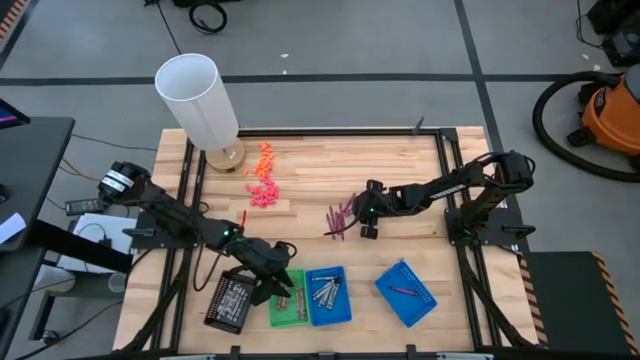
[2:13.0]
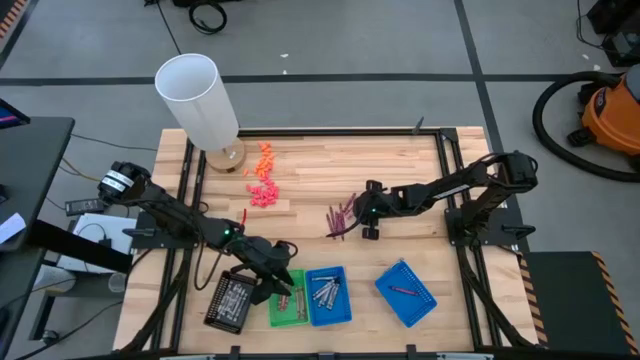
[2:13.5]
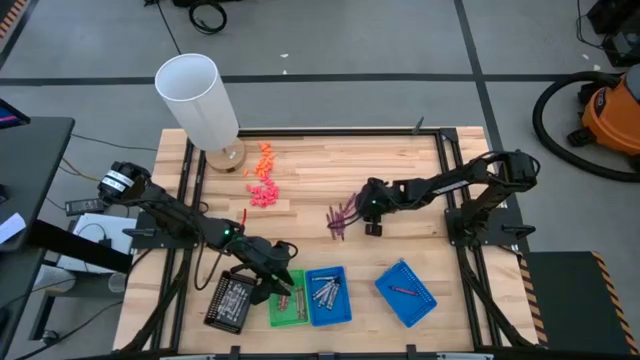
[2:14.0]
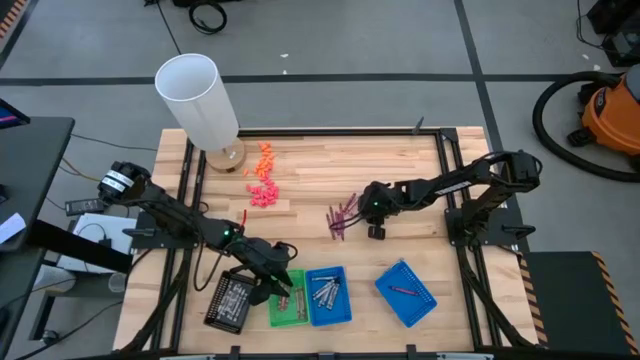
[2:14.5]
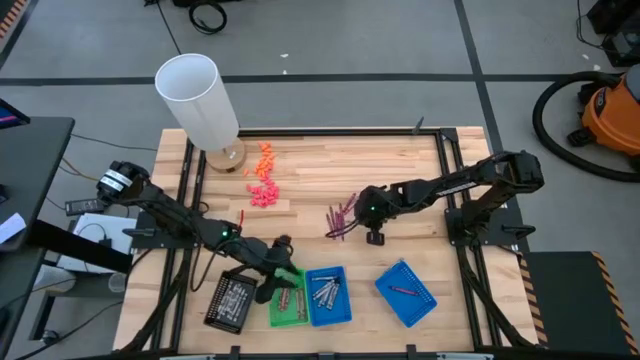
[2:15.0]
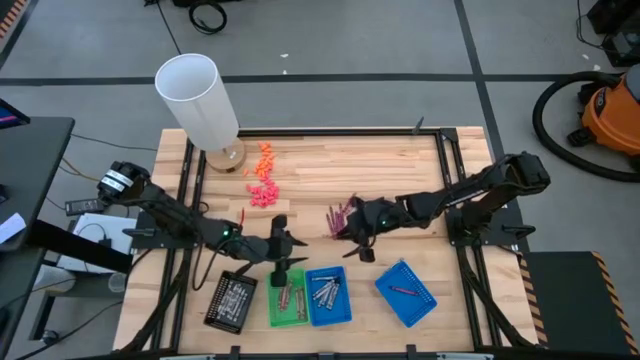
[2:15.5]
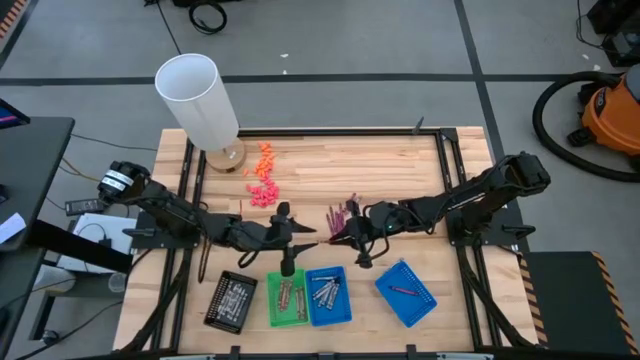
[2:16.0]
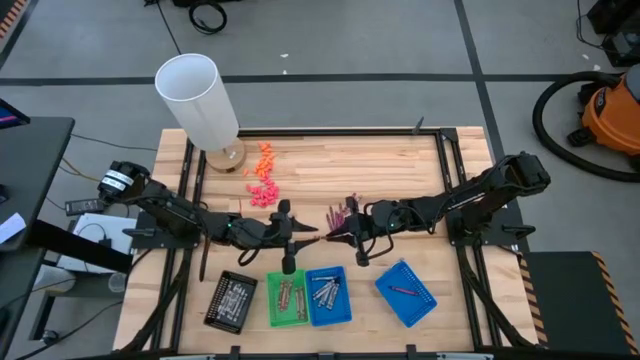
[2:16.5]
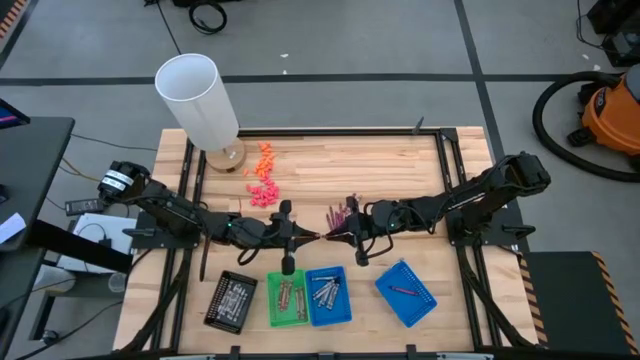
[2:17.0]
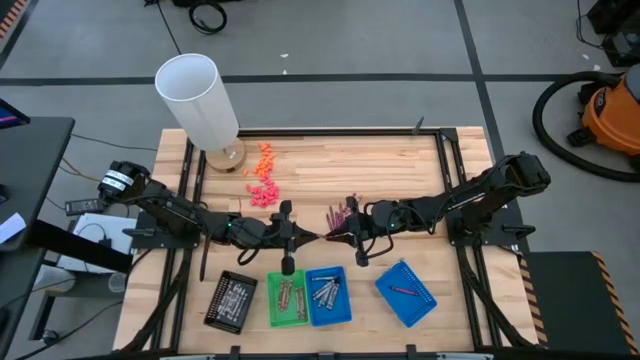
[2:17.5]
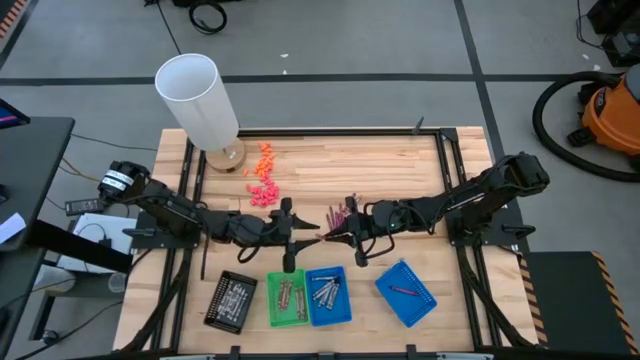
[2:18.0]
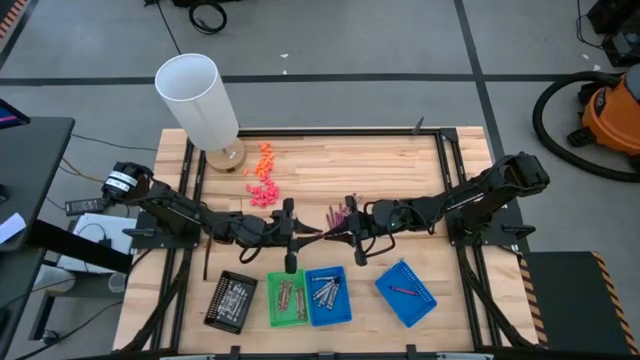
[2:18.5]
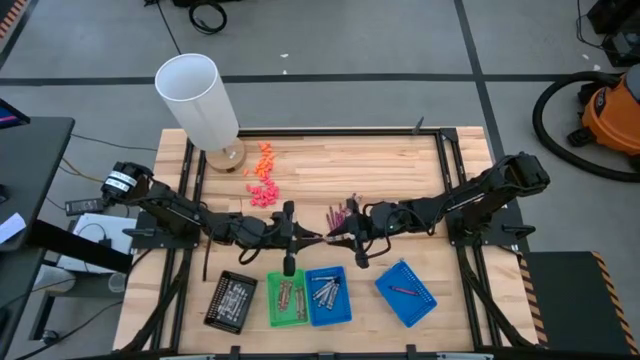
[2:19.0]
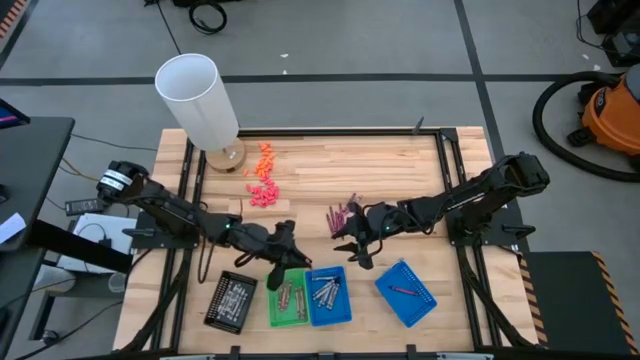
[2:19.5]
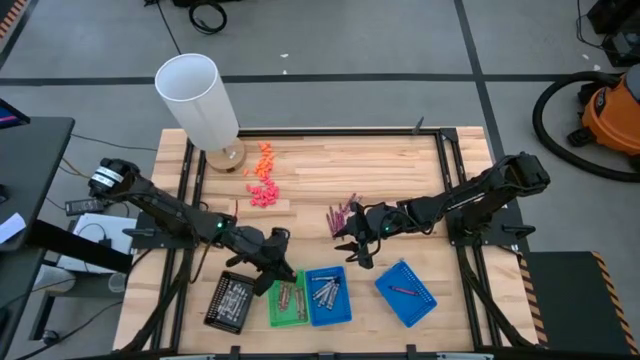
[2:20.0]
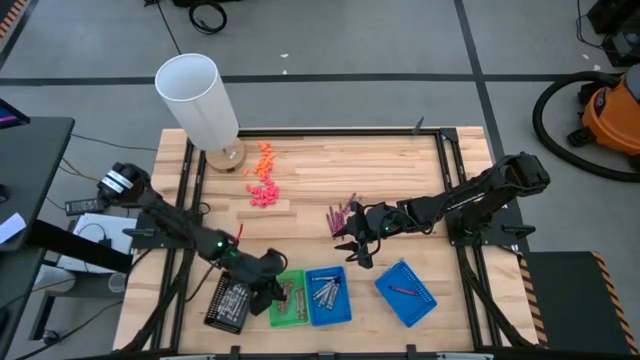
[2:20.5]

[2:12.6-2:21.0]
Task: Sort crayons
Put the pink crayon into the green bin

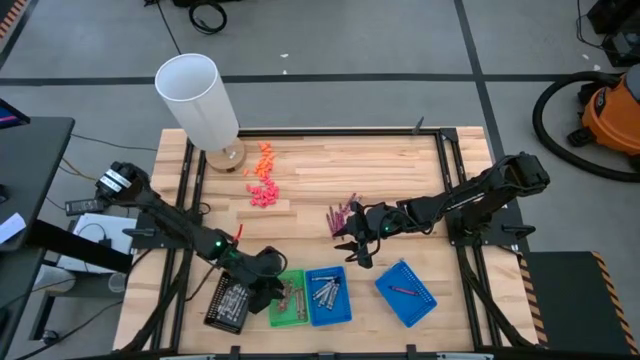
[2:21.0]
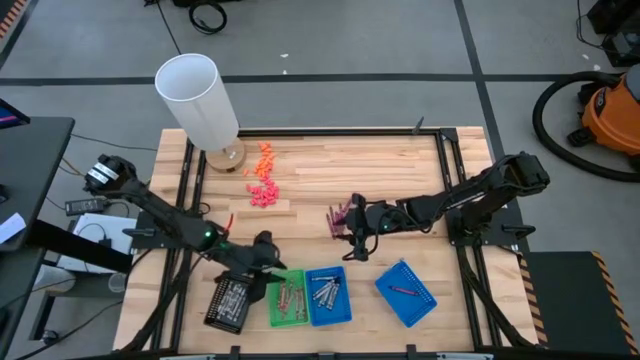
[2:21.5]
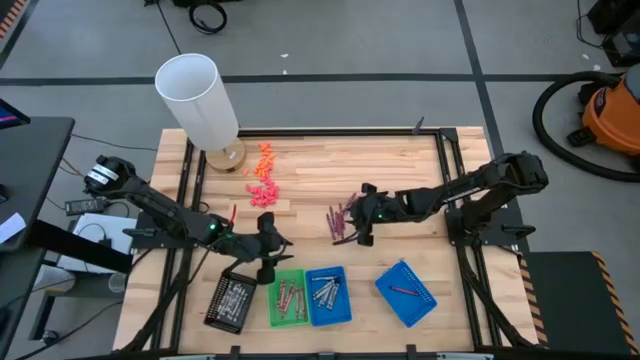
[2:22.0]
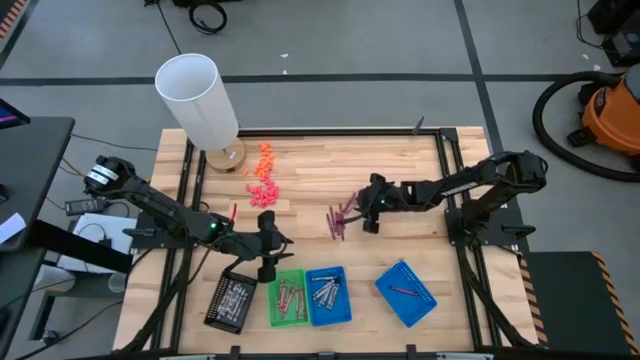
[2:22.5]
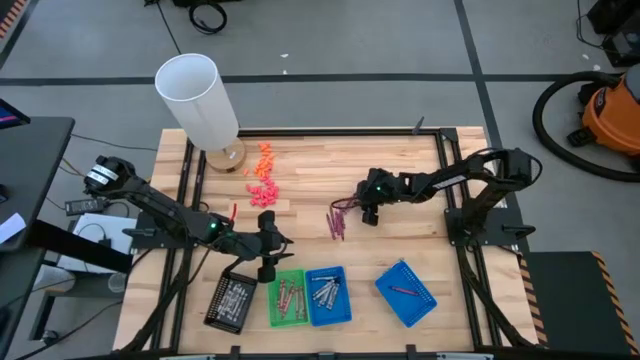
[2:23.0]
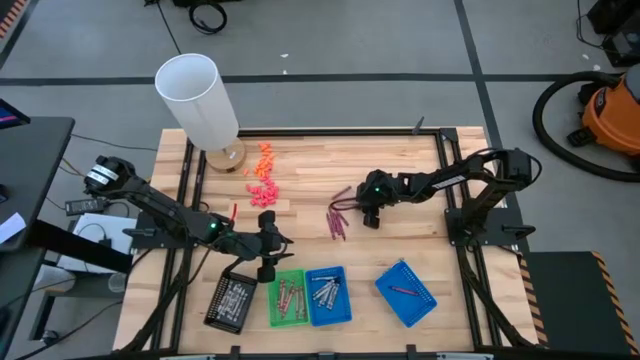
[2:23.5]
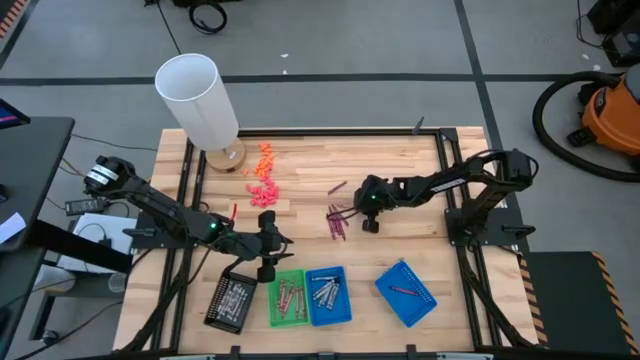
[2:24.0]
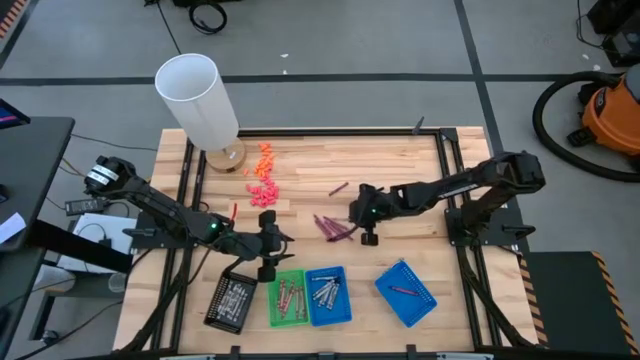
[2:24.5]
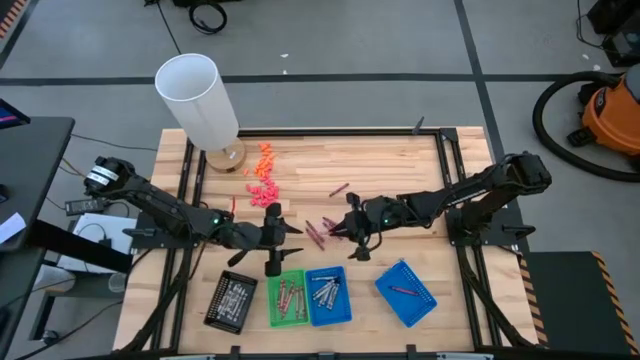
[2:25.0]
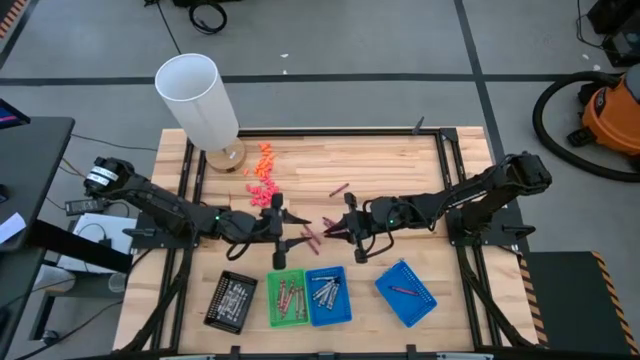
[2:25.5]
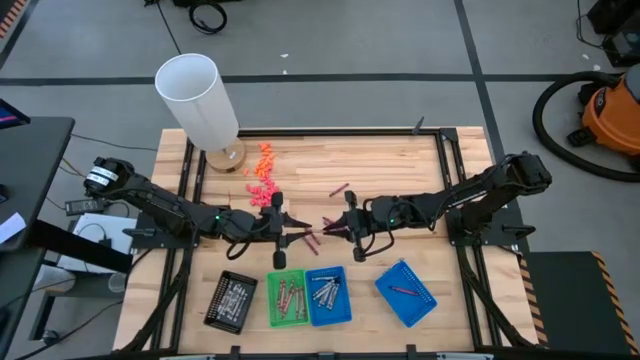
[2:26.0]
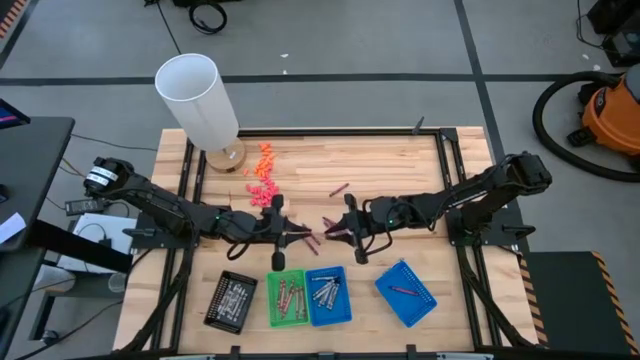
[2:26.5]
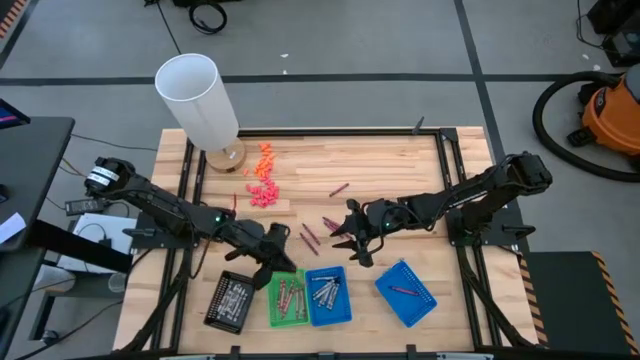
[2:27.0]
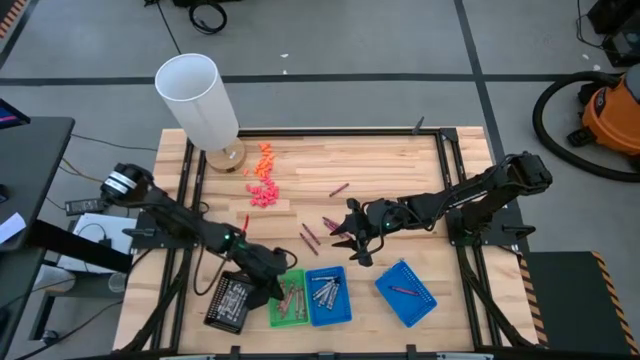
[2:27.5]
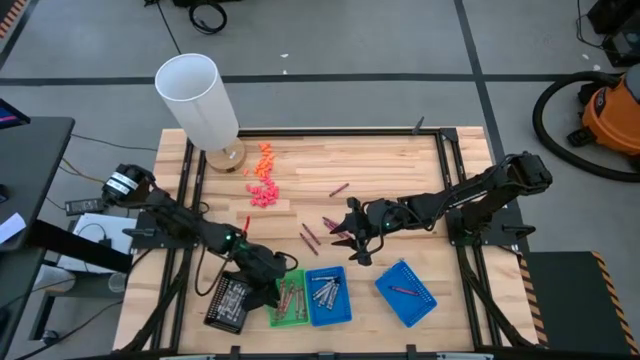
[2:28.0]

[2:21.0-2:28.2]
Put the pink crayon into the green bin

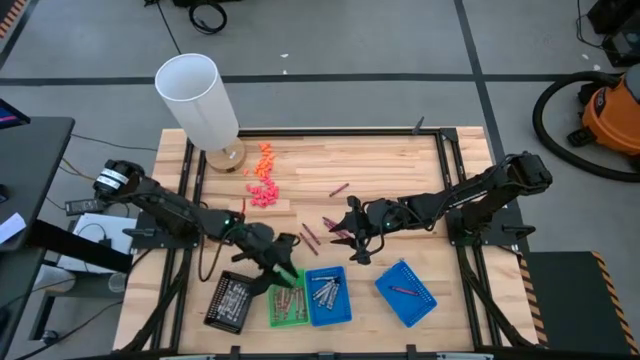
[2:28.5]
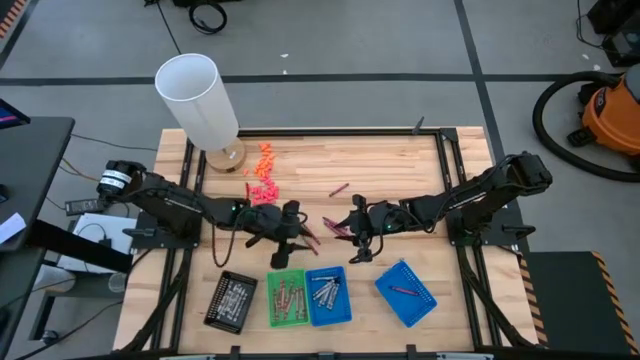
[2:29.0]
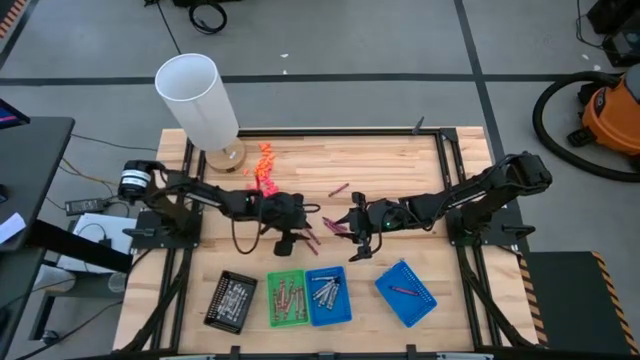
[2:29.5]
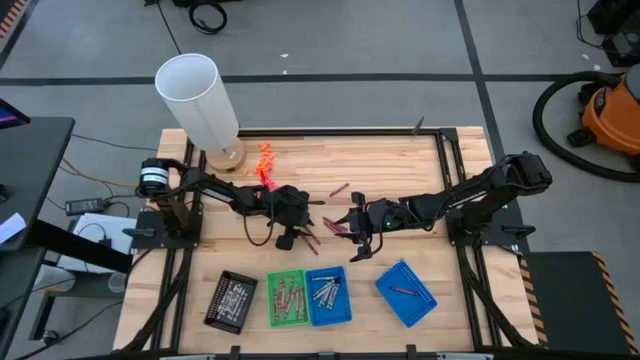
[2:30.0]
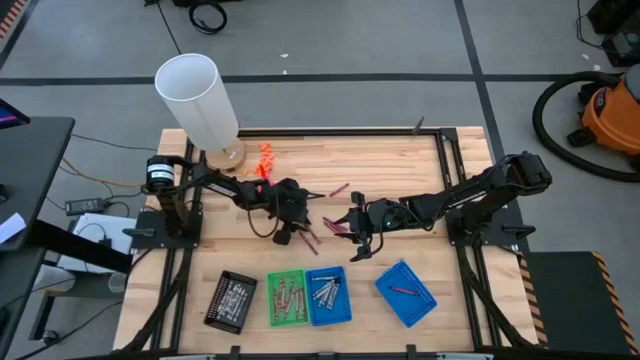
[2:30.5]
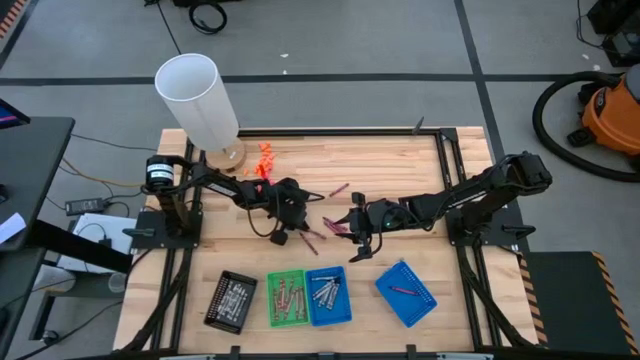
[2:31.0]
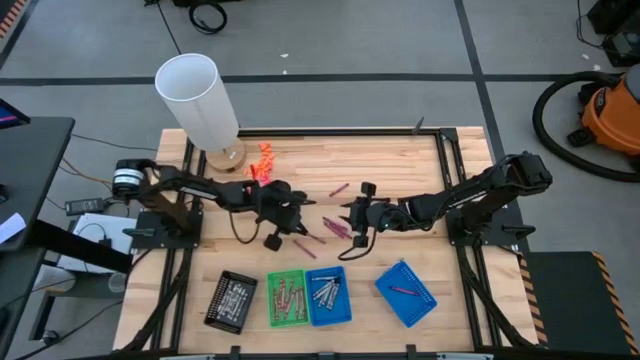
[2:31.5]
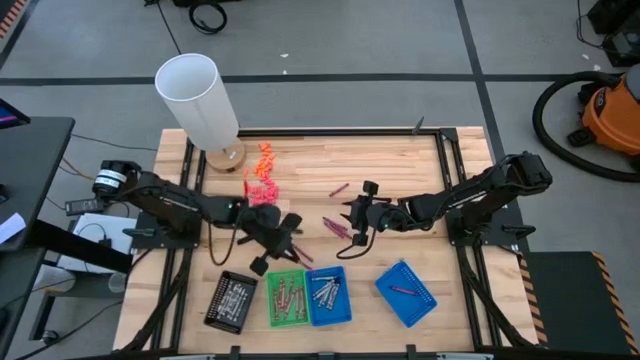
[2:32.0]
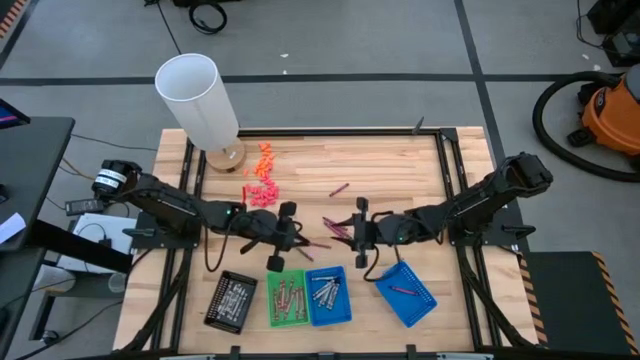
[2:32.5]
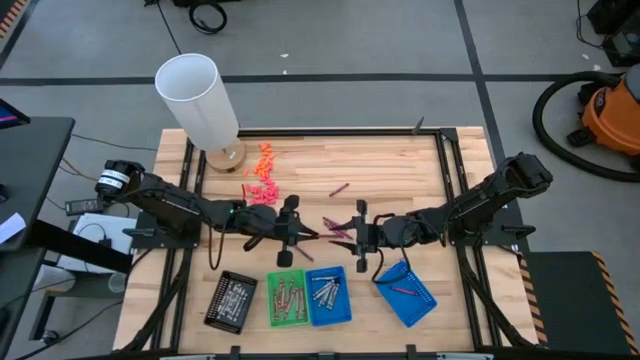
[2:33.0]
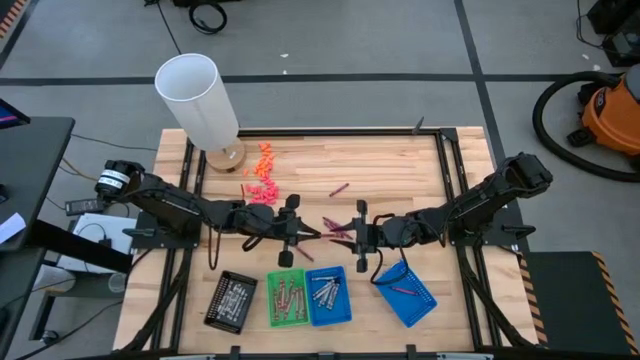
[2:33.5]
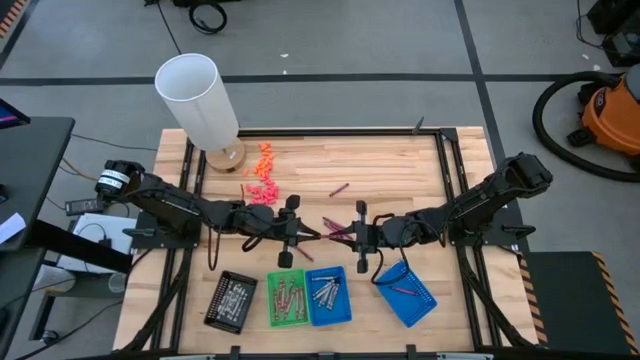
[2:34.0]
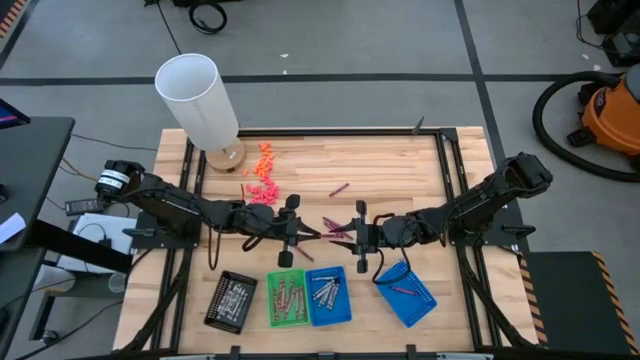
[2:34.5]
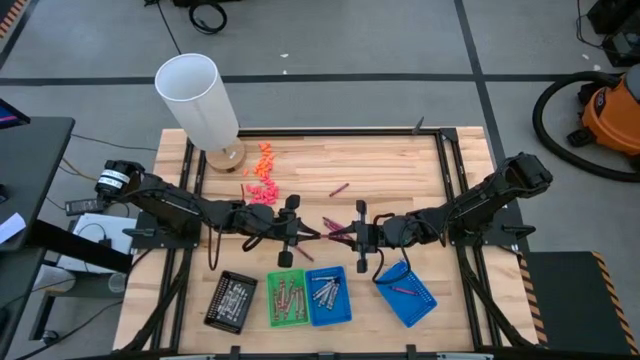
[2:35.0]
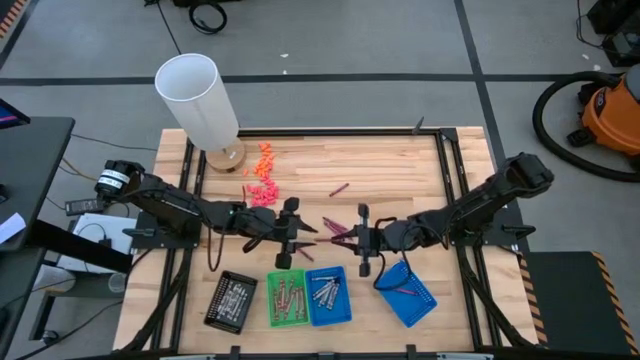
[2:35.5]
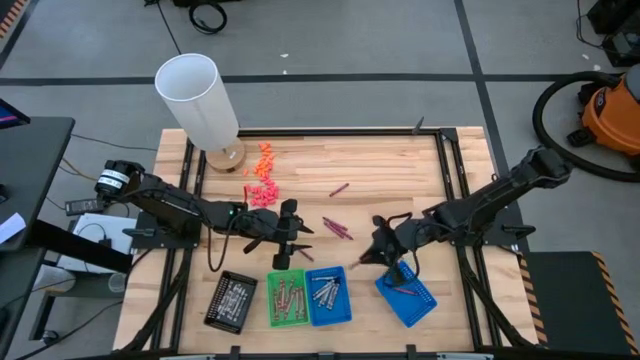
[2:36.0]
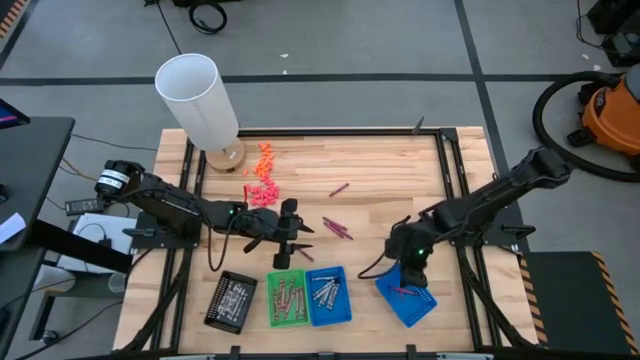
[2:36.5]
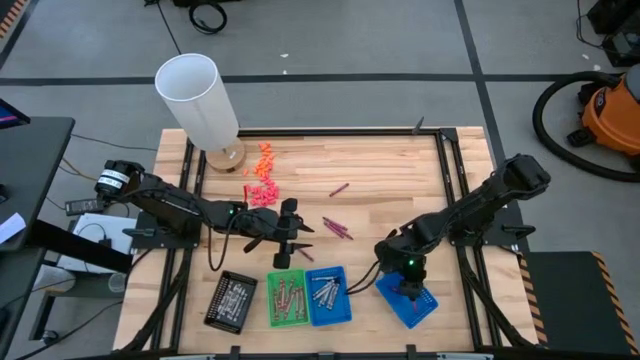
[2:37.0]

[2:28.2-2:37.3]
Put the red crayon into the right blue bin
